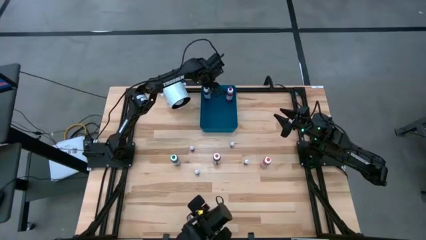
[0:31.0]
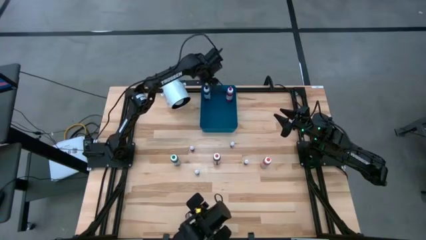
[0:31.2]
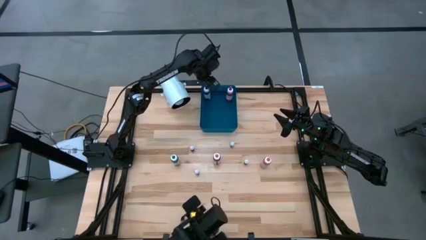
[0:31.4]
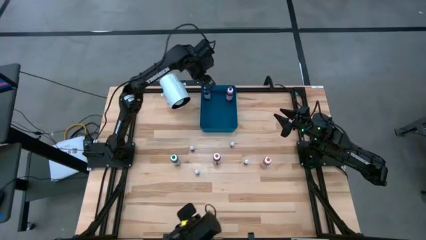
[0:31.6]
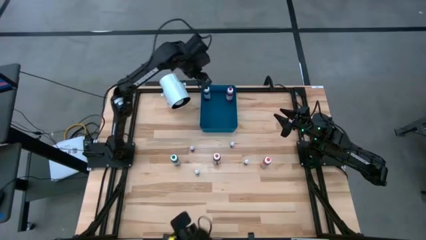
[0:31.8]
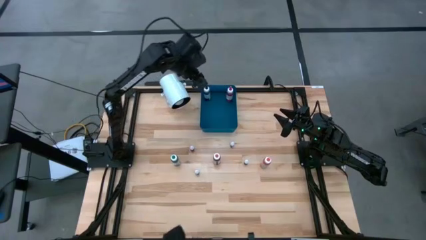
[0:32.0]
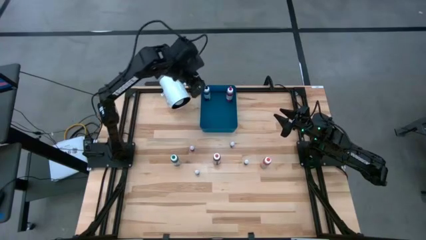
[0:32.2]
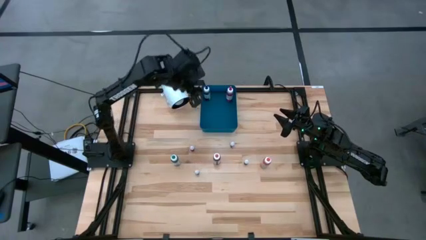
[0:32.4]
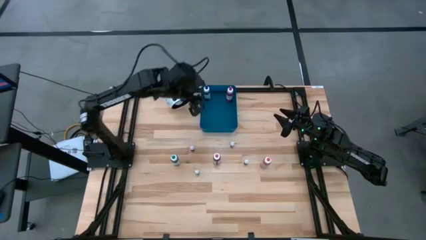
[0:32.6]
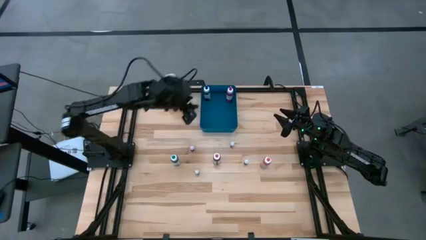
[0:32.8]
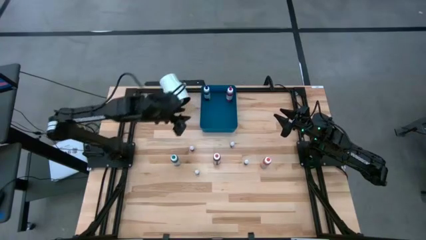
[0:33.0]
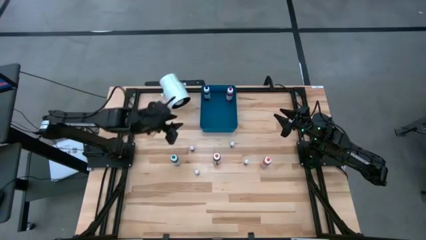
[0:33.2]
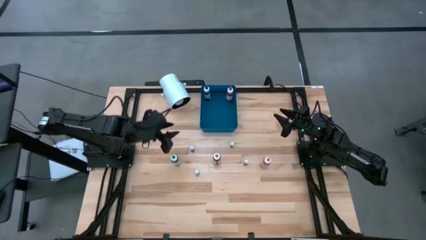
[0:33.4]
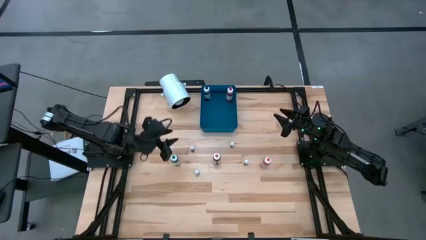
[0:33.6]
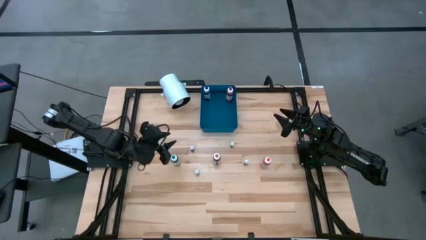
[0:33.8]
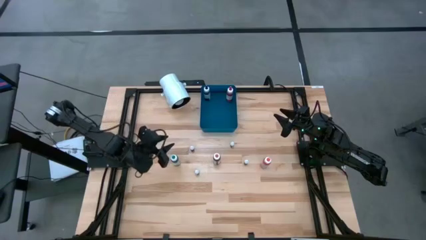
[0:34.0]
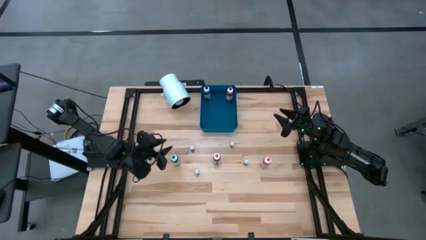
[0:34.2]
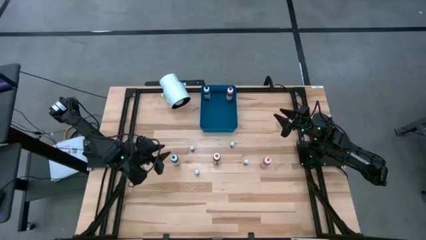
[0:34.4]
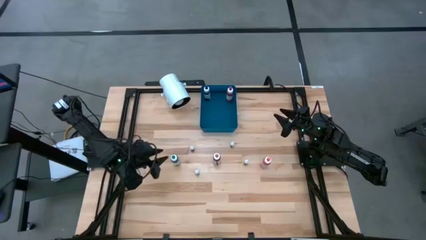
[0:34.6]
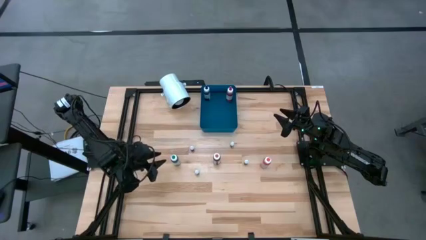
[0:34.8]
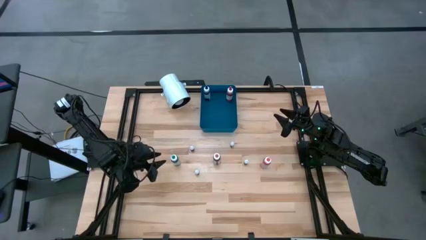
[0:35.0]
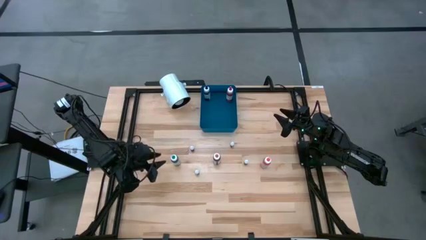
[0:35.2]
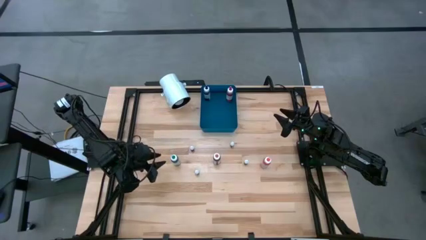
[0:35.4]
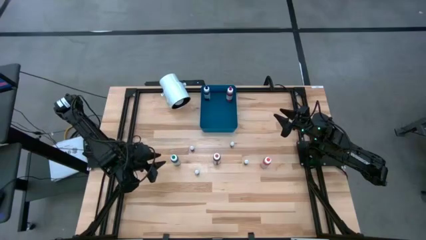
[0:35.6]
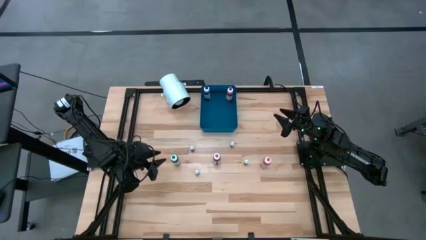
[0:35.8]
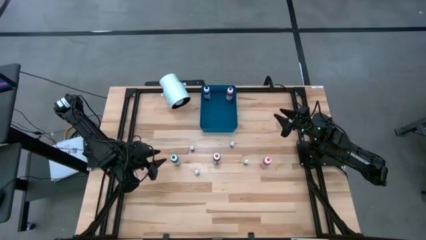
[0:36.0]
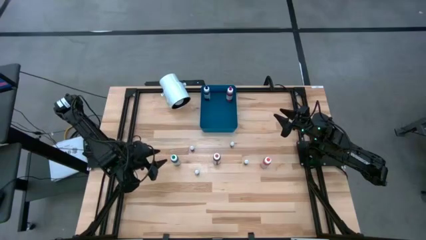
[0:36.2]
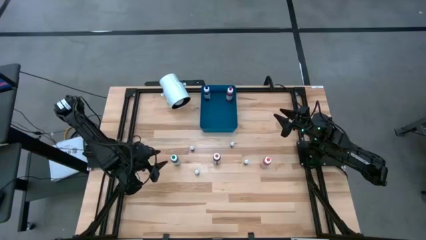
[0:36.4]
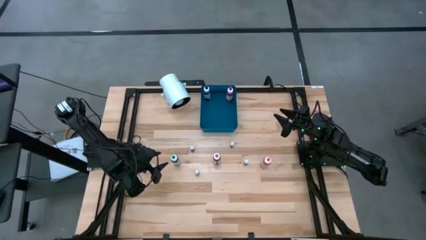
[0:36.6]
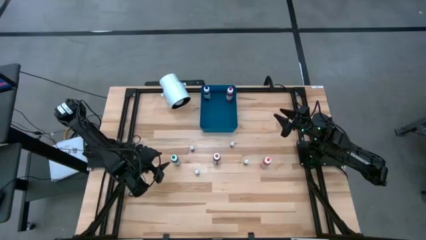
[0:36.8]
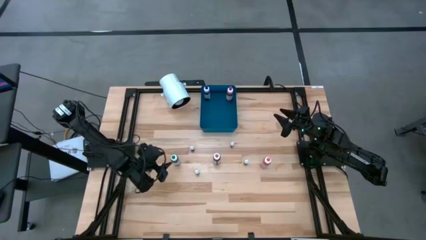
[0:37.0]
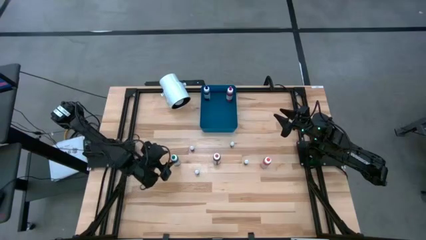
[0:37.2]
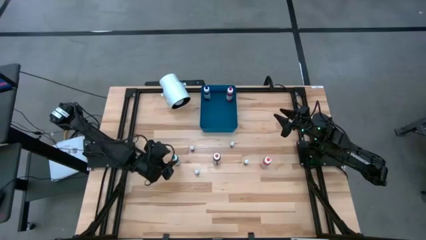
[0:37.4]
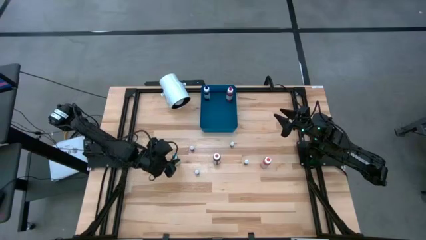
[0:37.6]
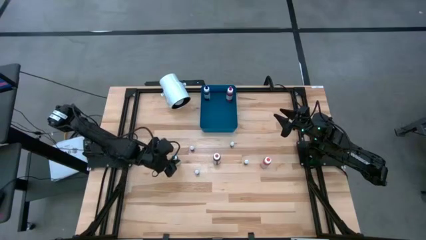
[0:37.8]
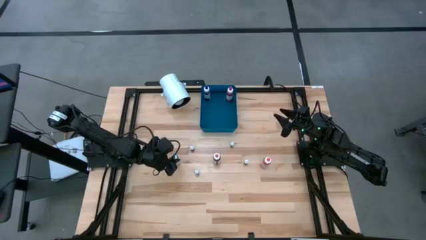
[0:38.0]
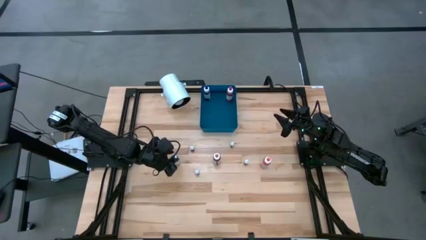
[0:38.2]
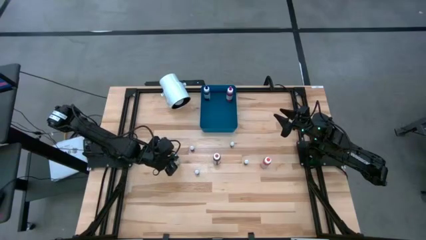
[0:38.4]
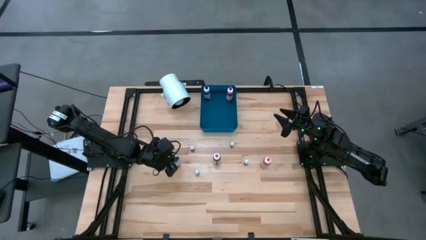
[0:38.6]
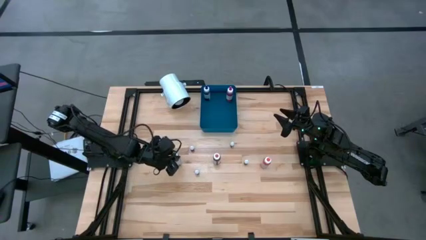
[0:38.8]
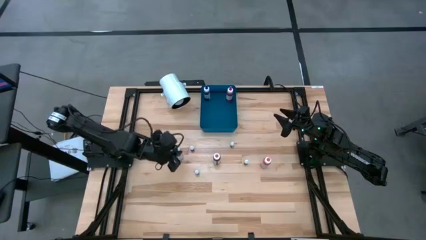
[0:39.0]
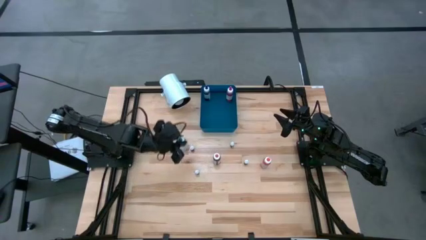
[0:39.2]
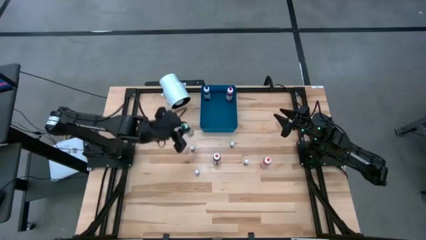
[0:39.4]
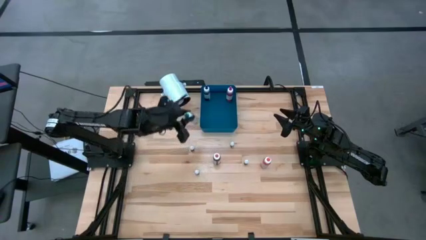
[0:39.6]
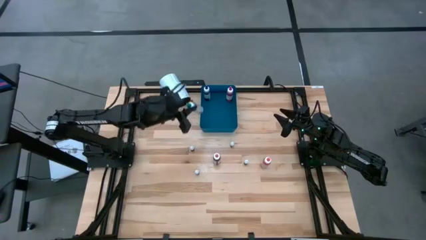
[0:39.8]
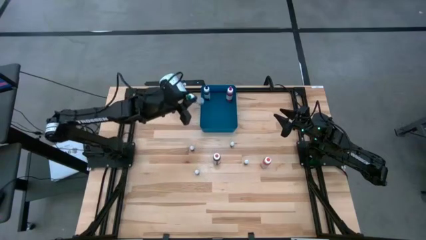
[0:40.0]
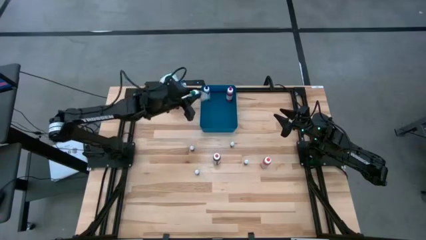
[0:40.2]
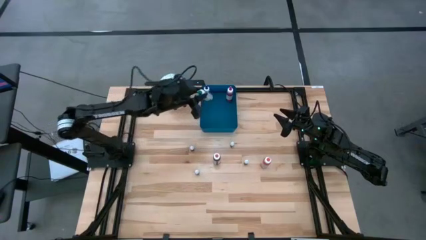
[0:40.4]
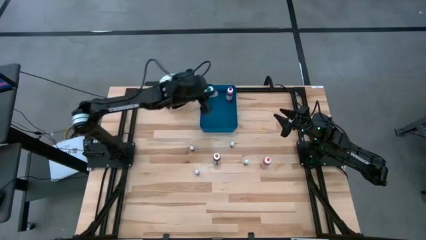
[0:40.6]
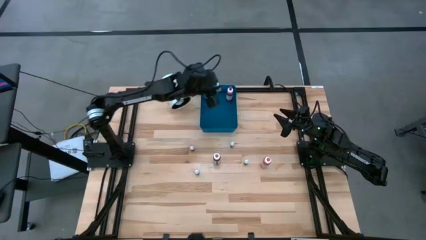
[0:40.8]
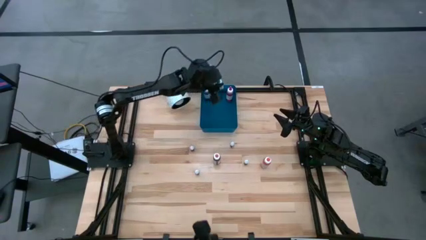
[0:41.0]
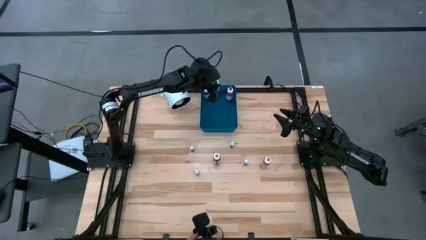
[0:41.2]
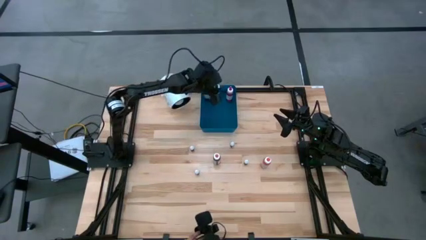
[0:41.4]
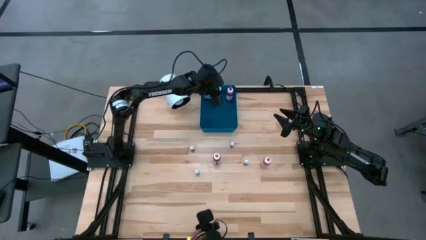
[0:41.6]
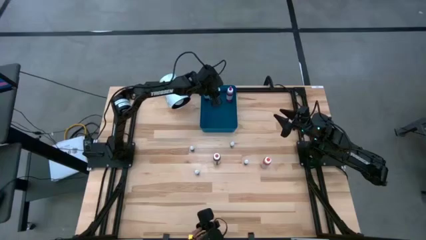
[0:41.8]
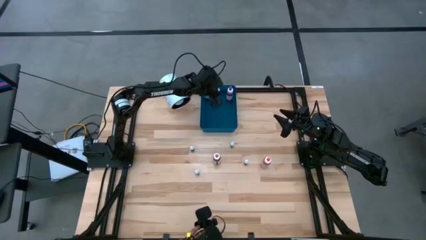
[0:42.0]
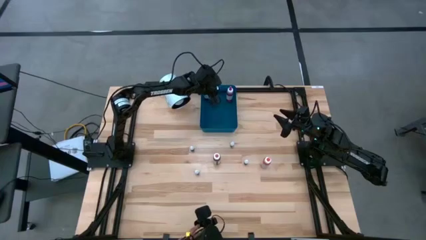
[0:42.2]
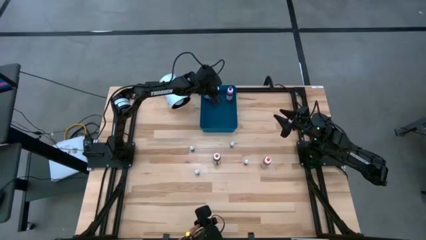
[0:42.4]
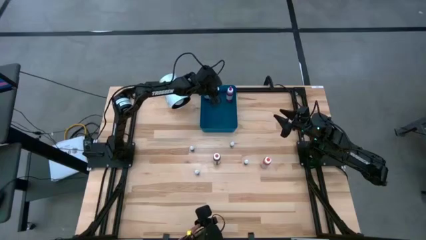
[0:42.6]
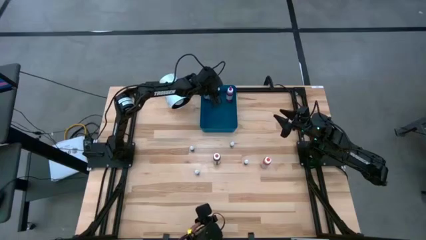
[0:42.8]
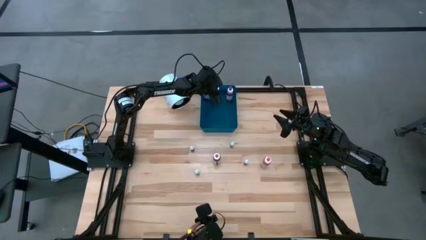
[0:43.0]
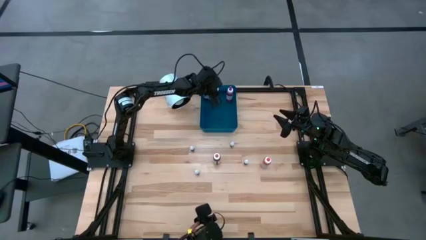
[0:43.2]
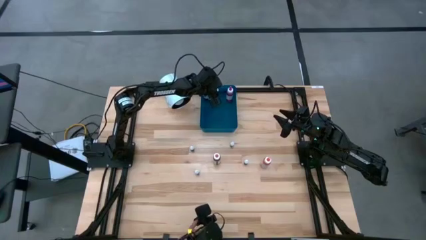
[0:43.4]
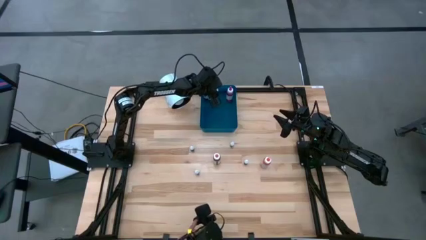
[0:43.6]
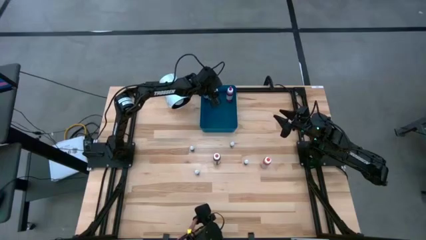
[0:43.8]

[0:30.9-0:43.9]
Task: Pick & Place food coloring
Put the large green food coloring bottle into the blue bin

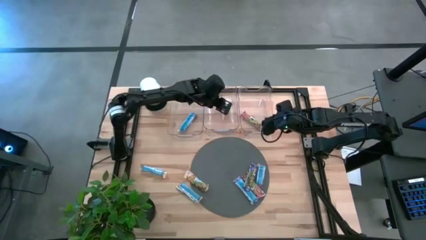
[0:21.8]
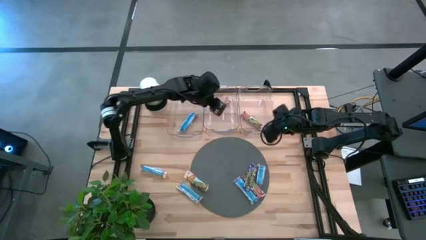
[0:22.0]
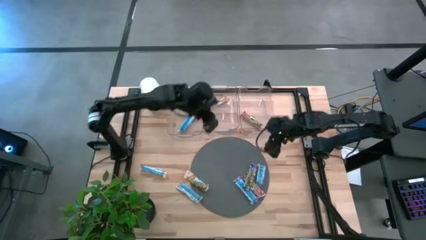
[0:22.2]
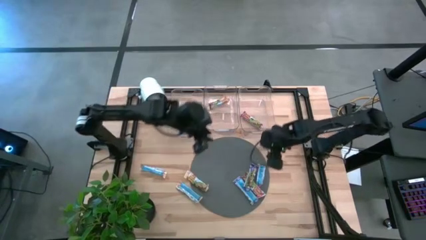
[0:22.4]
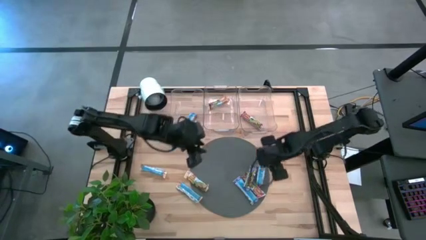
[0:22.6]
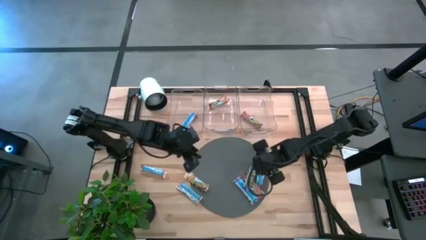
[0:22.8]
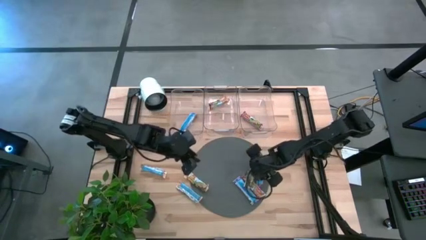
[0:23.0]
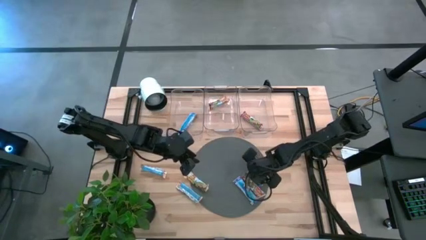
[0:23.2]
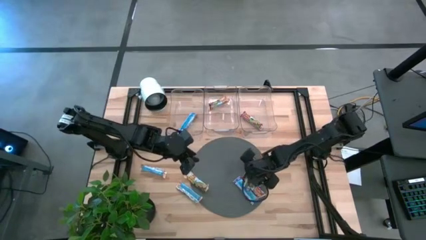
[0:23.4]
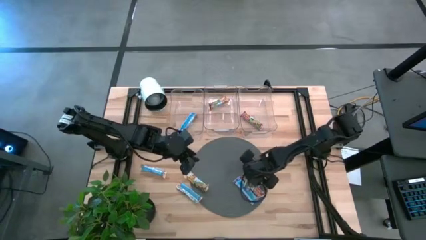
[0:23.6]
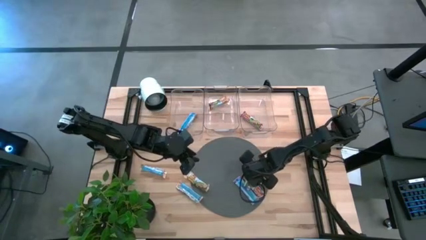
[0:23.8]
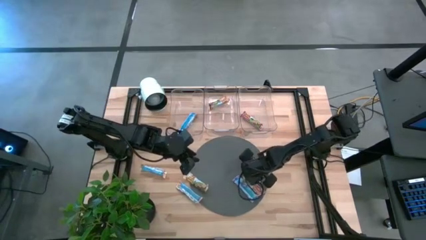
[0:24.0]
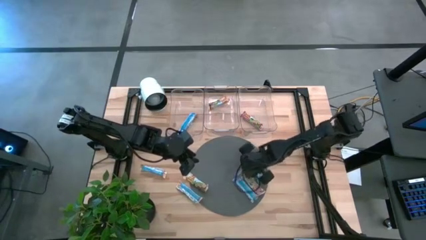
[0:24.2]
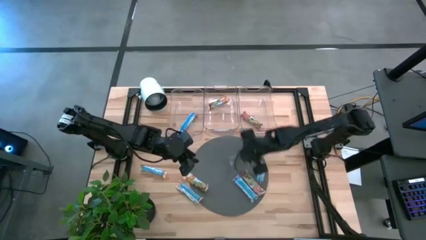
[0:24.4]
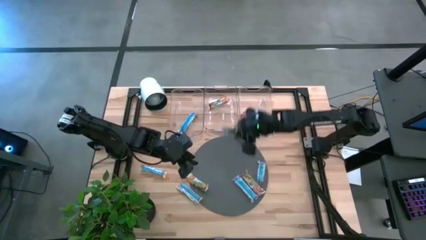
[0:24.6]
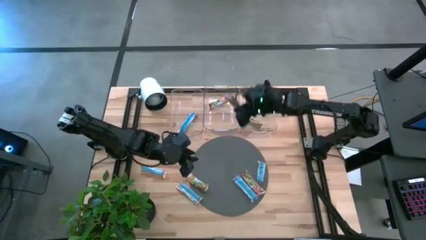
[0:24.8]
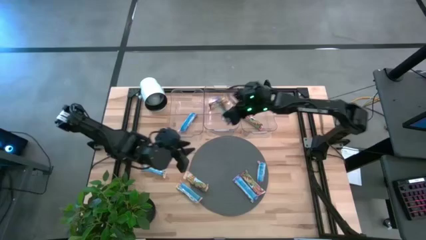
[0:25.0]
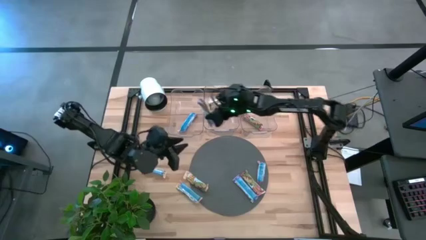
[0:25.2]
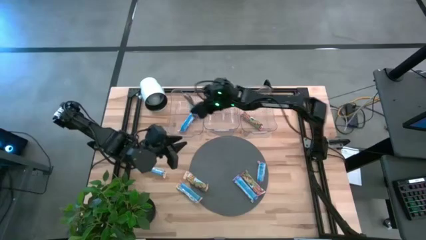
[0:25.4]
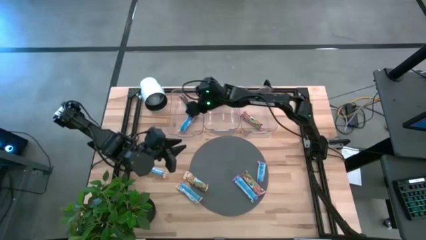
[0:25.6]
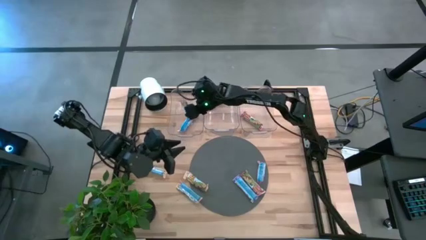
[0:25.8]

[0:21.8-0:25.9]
Task: Pick and place Granola Bars by type
Put the blue granola bar into the left bin
